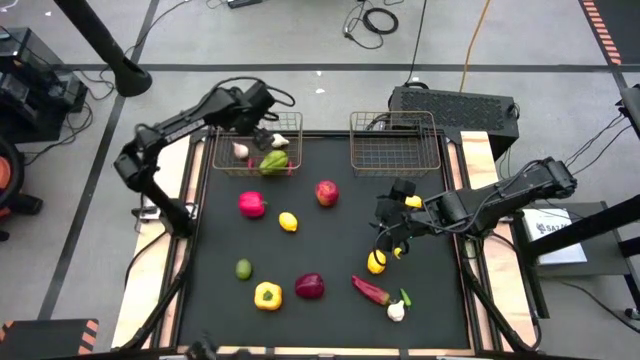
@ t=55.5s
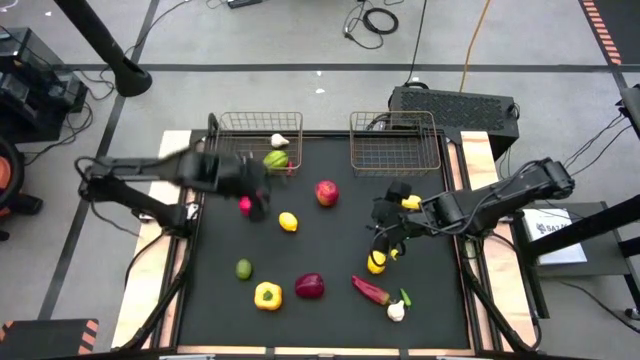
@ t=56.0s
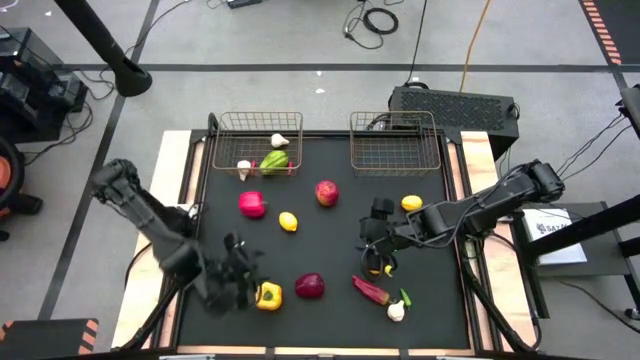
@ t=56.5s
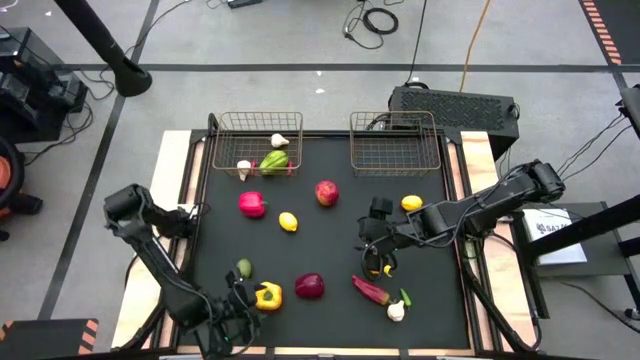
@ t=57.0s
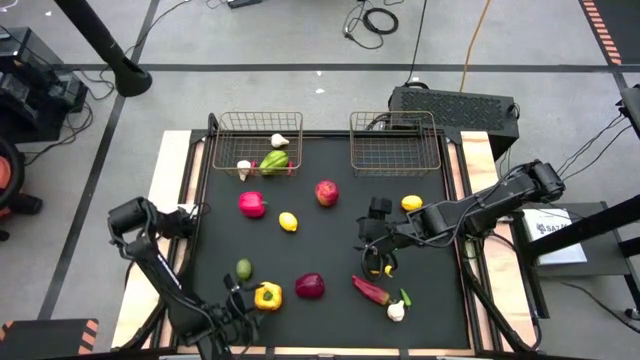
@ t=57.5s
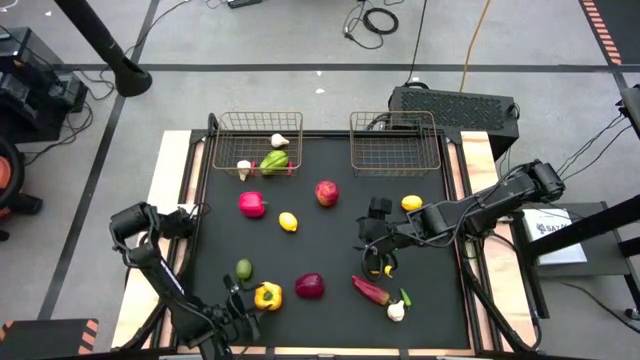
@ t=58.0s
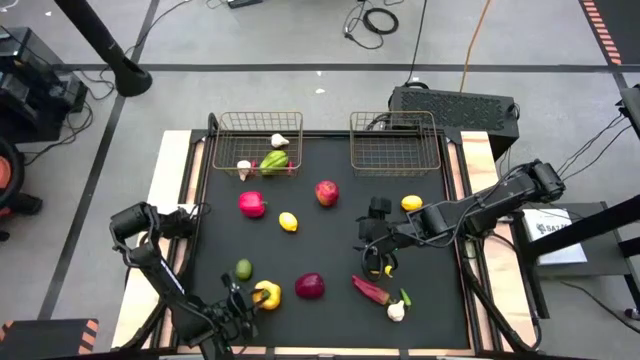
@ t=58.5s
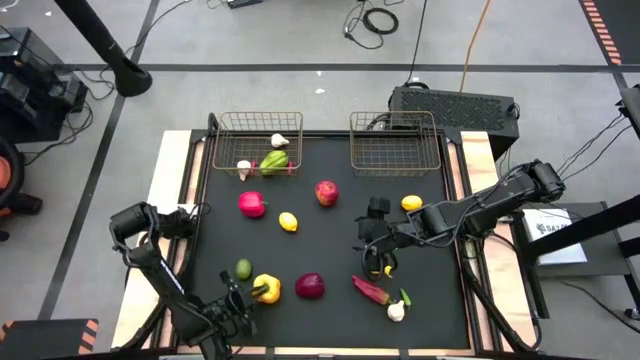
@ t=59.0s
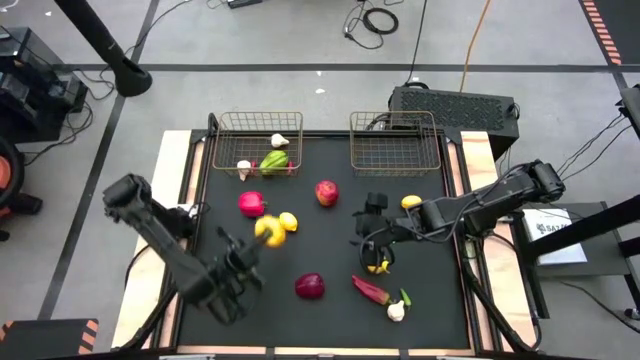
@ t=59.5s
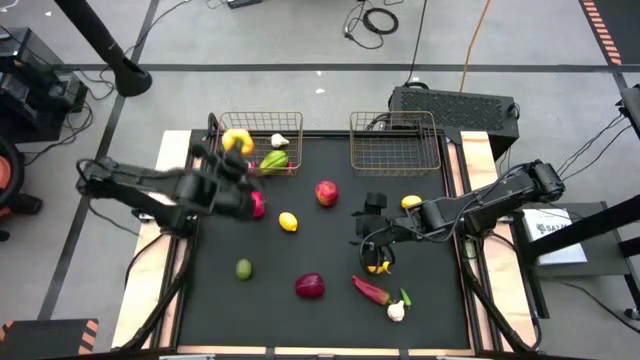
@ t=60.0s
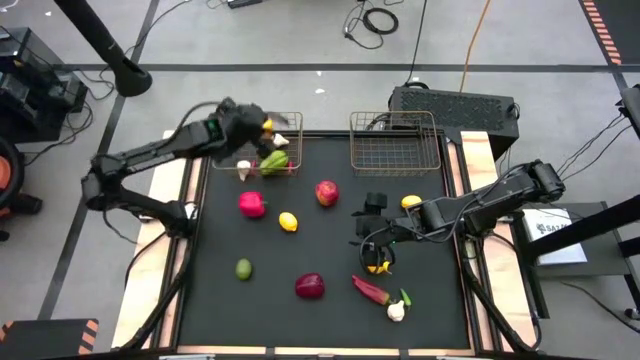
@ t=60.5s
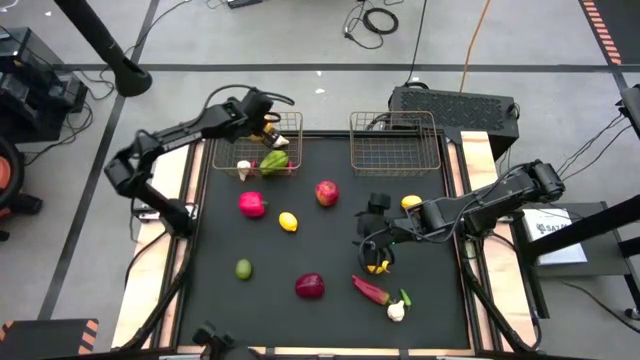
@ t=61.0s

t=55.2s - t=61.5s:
Task: Sort produce into baskets
Put the yellow bell pepper into the left wire basket

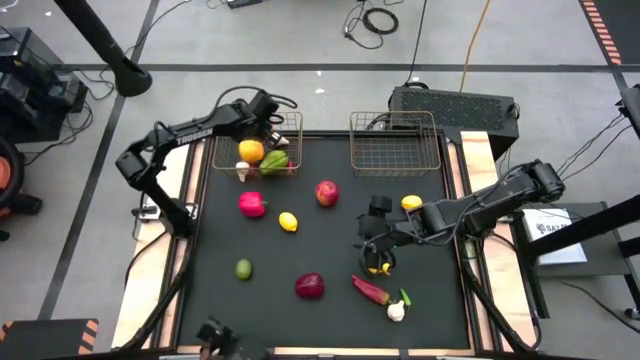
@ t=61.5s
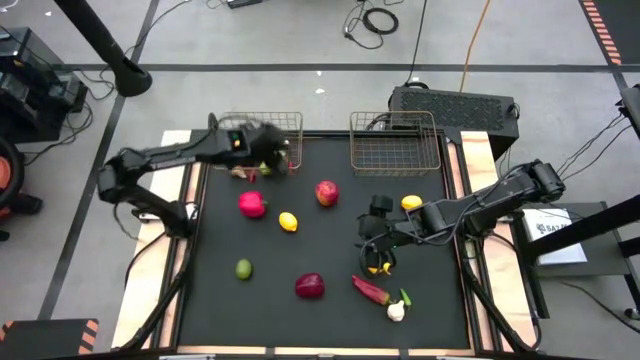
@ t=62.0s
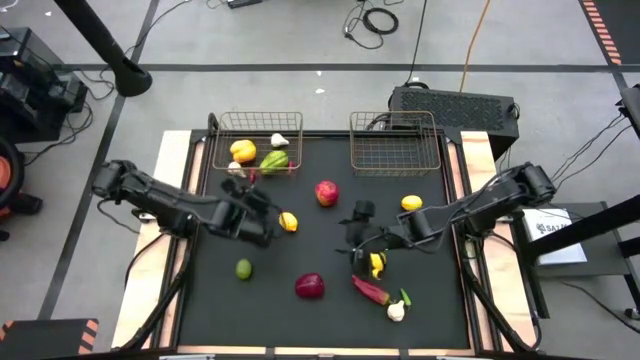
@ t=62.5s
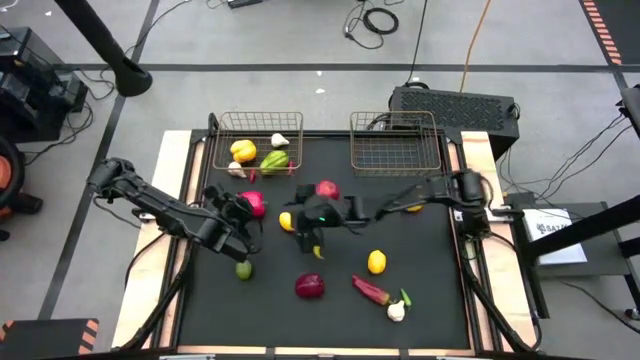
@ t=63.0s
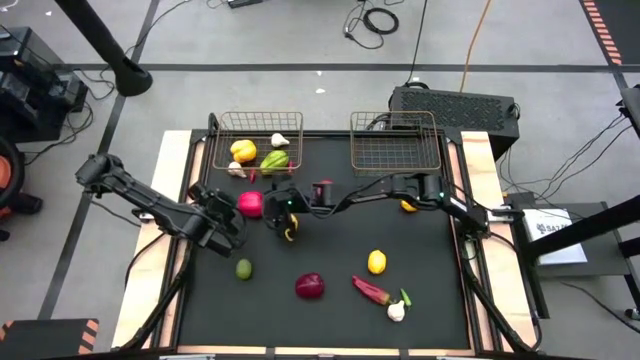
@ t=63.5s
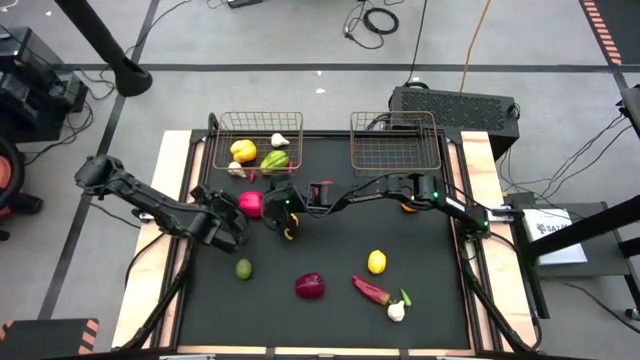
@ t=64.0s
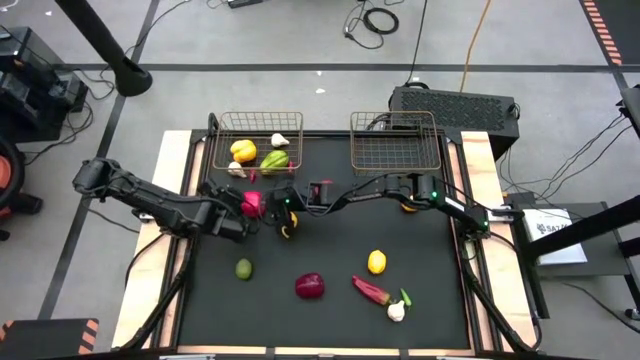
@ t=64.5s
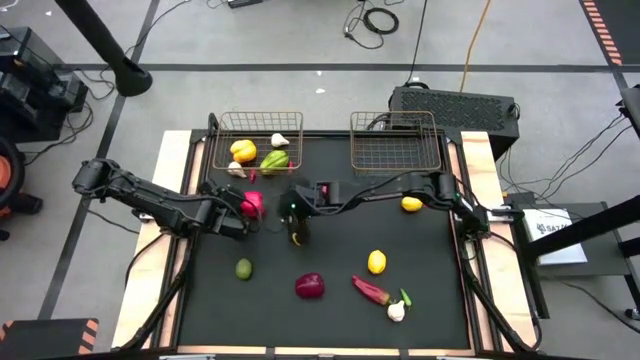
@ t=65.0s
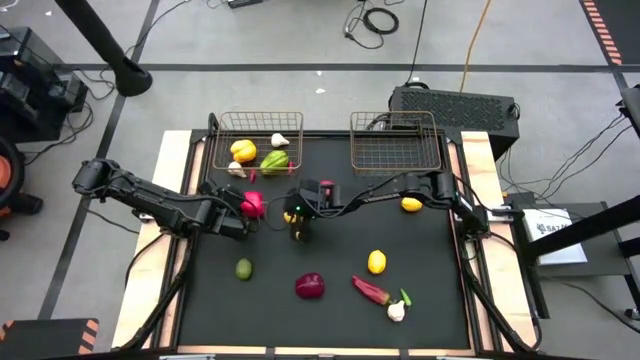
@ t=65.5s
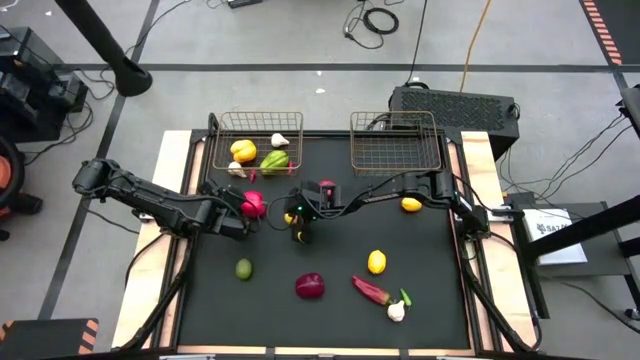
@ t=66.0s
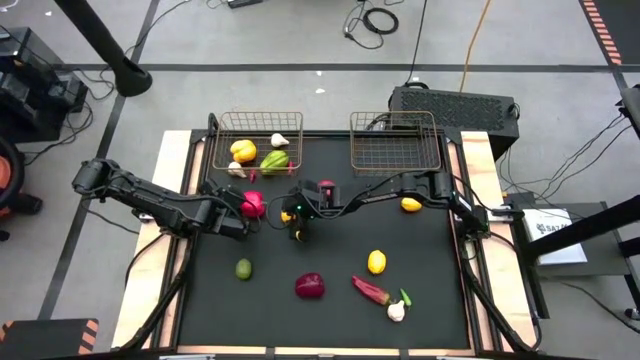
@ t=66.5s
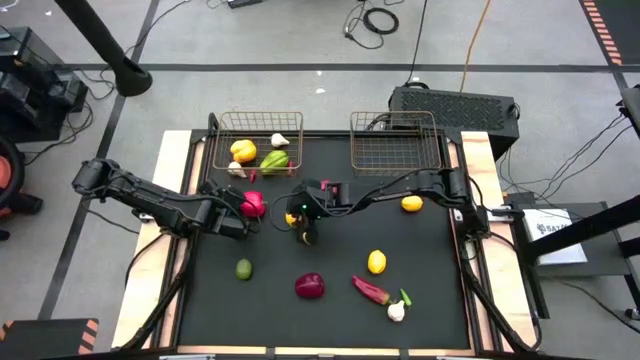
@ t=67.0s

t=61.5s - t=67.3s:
Put the top left yellow lemon into the right wire basket

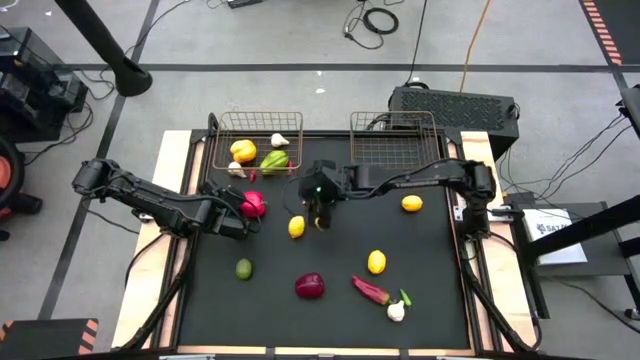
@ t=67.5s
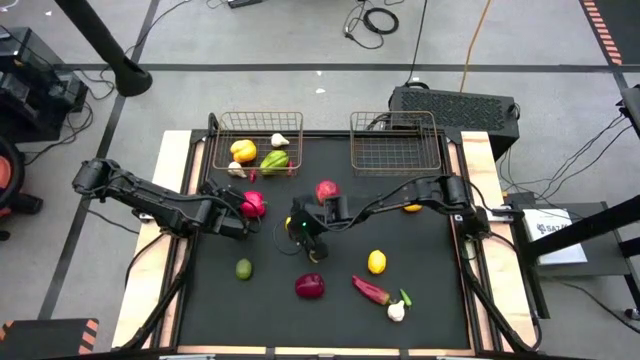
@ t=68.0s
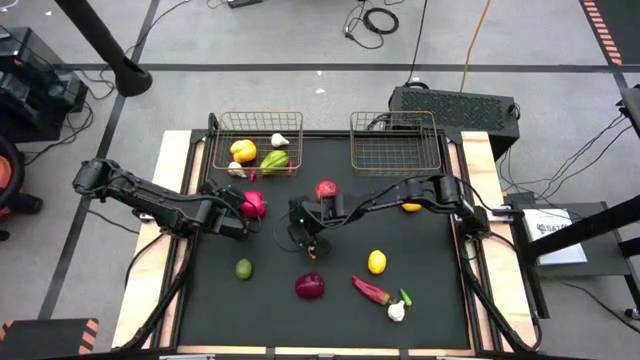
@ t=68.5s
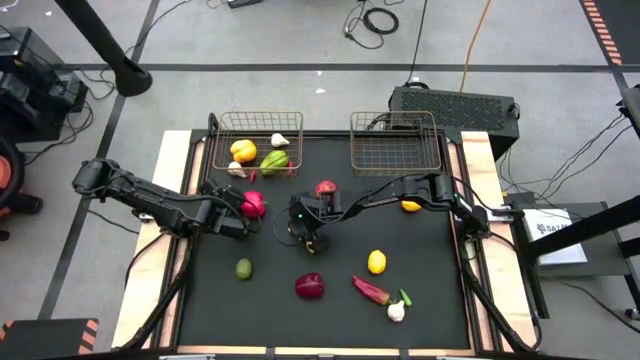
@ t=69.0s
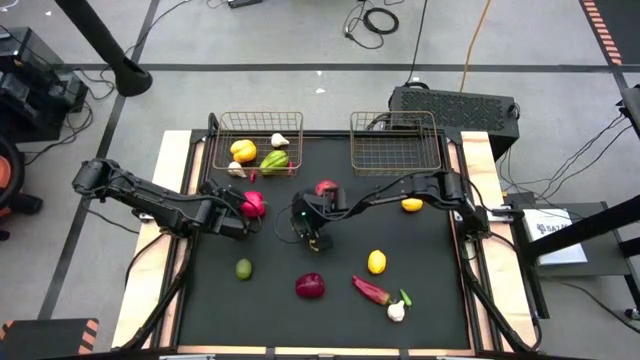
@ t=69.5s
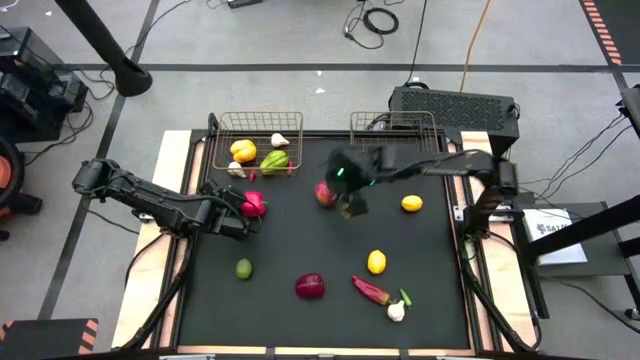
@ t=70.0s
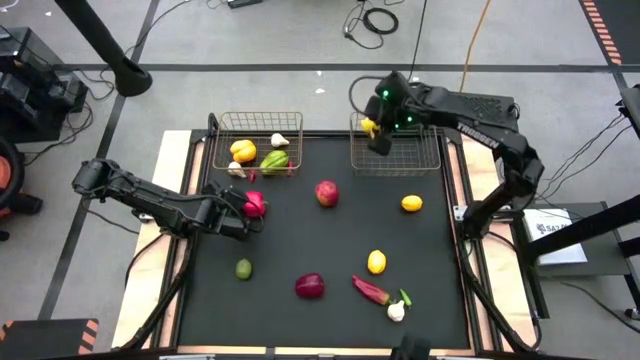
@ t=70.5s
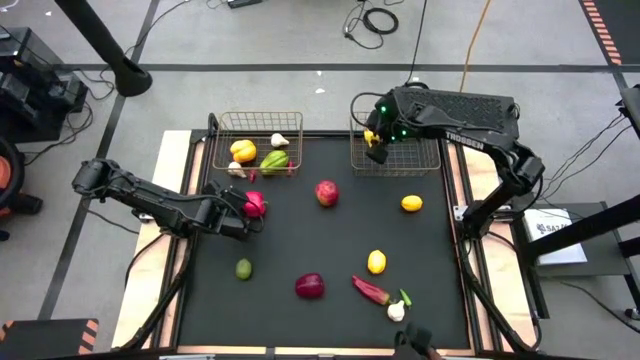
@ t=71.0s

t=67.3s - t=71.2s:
Put the top left yellow lemon into the right wire basket

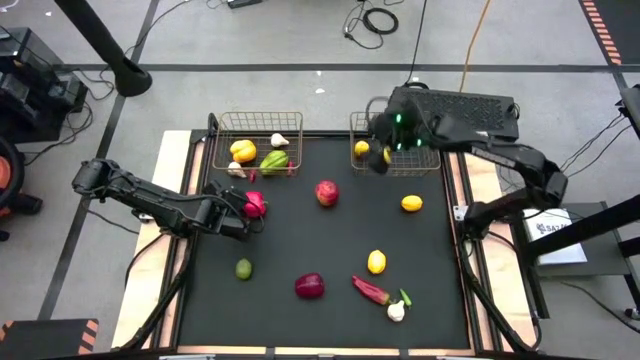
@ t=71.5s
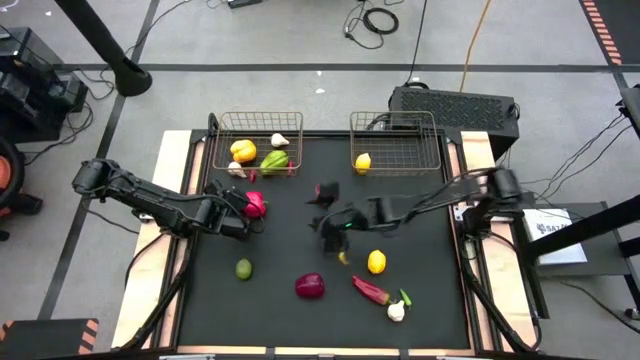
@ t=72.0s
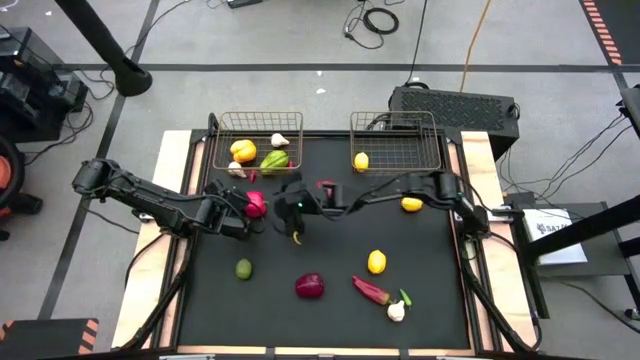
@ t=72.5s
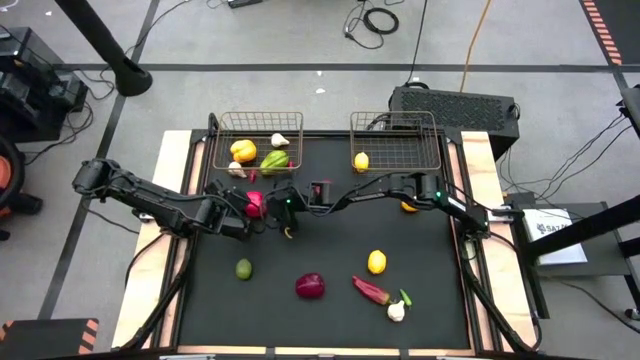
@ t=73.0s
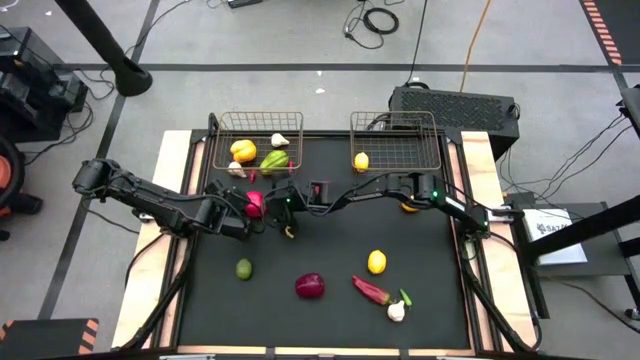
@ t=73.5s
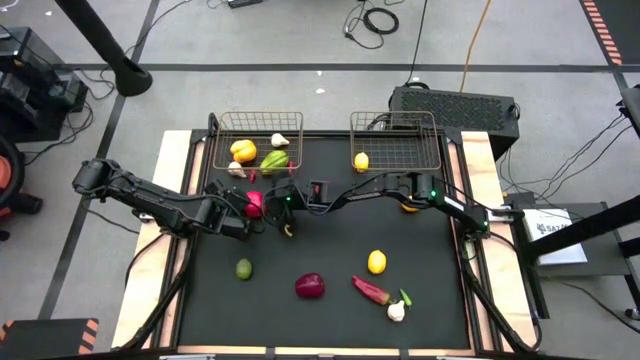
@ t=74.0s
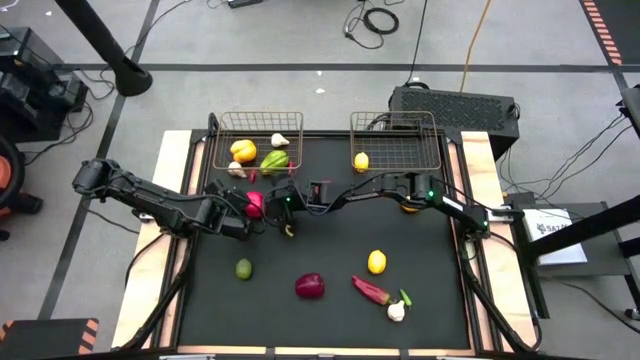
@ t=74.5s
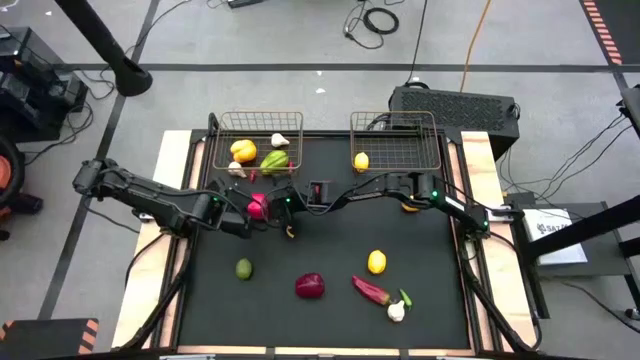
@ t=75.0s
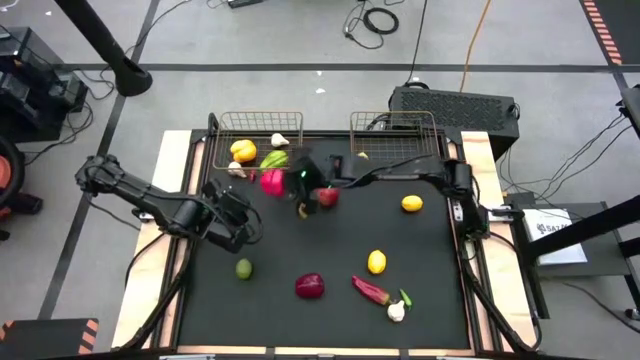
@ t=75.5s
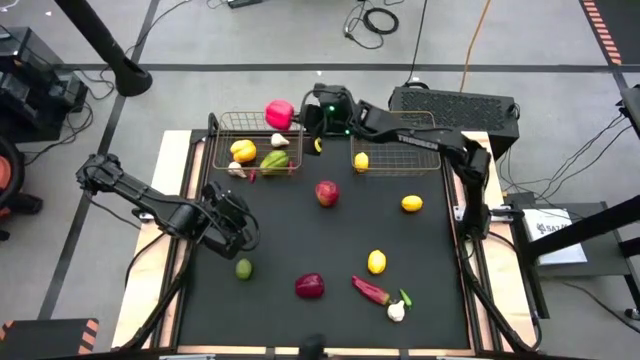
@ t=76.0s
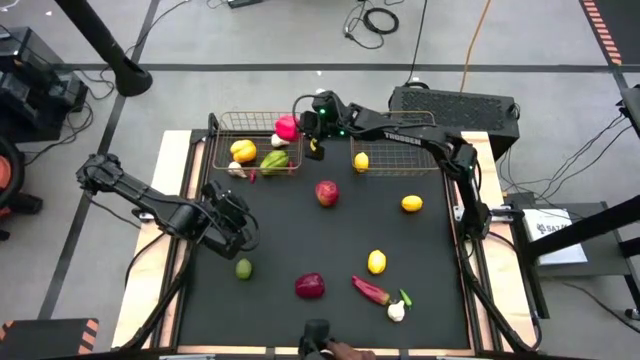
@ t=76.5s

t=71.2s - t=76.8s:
Put the red bell pepper into the left wire basket
